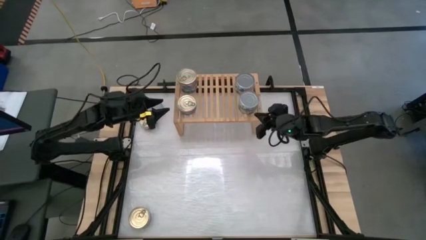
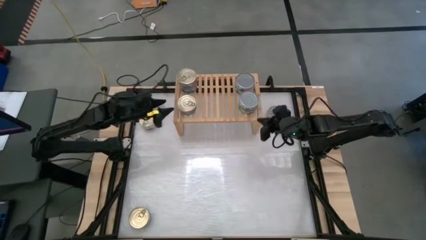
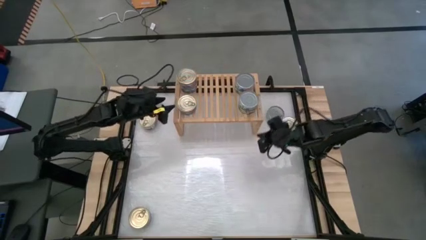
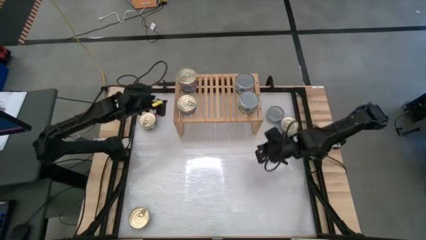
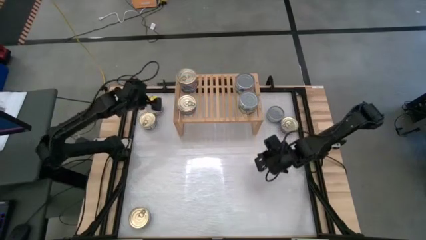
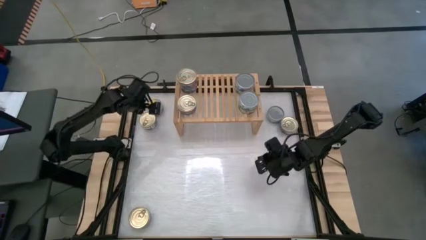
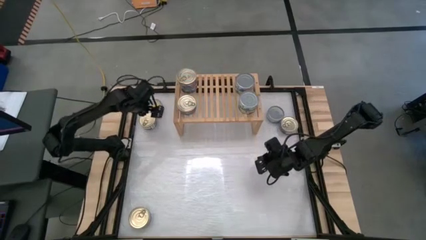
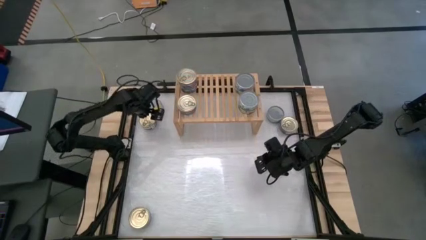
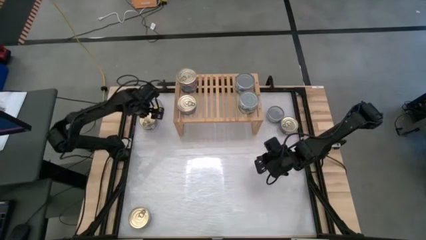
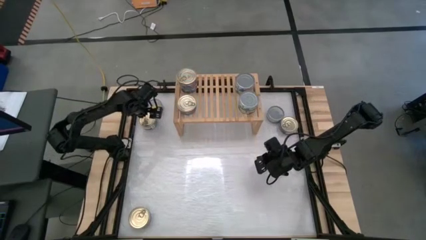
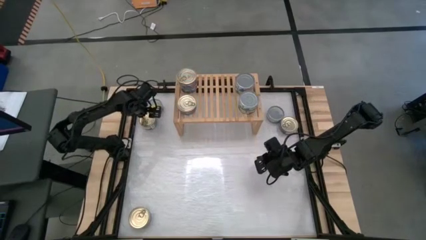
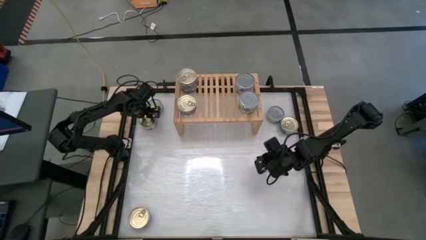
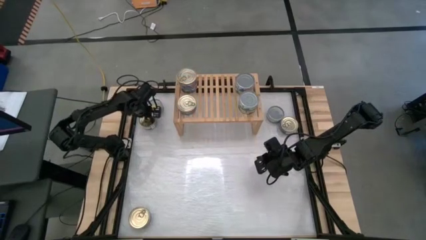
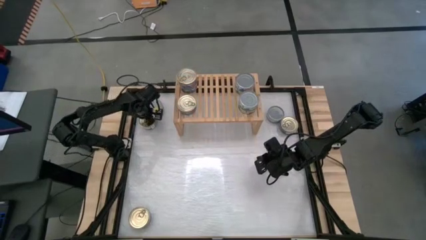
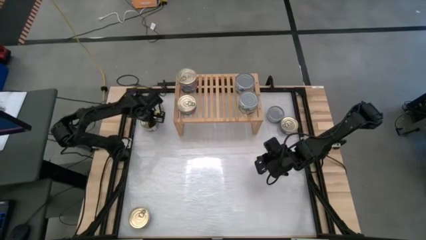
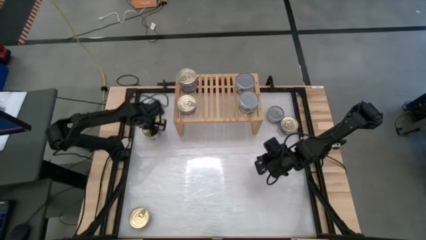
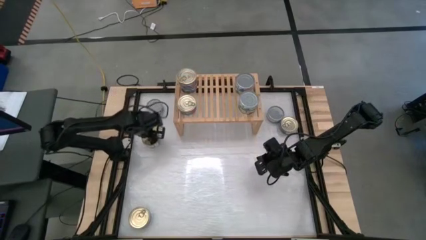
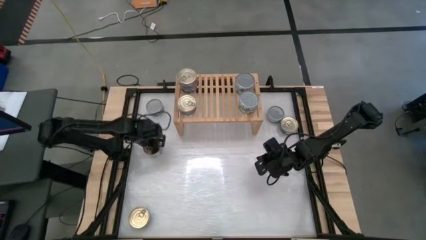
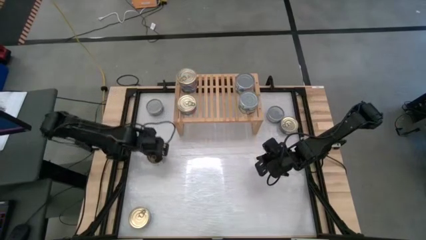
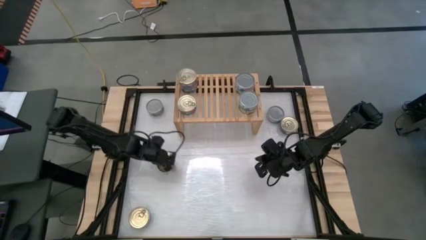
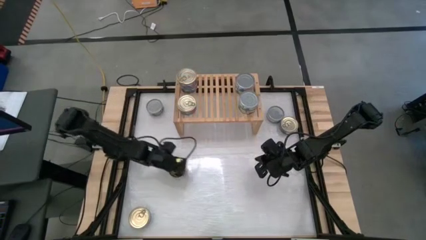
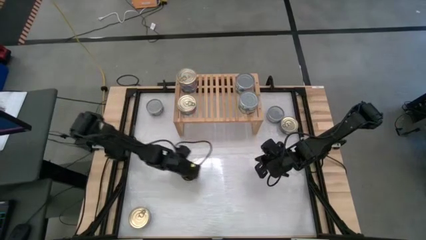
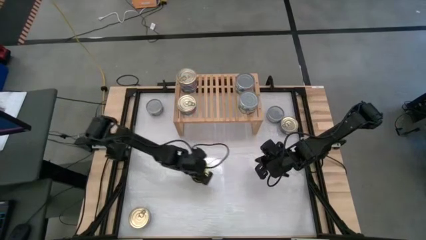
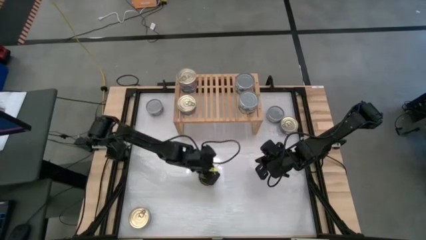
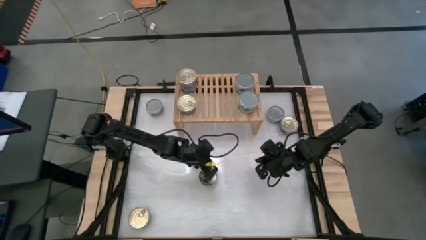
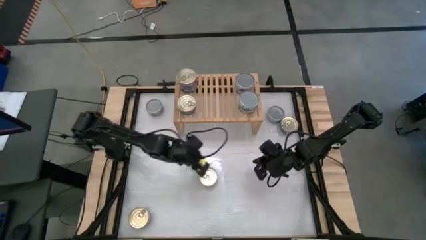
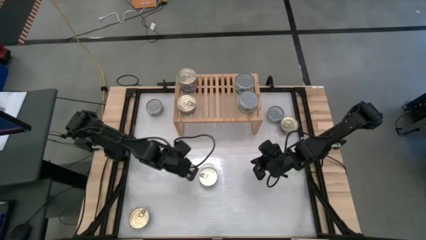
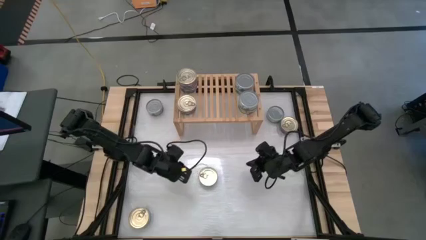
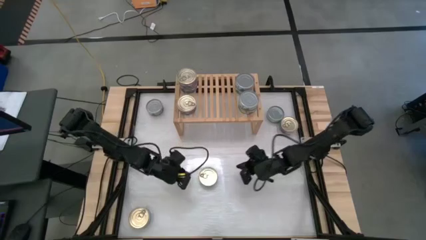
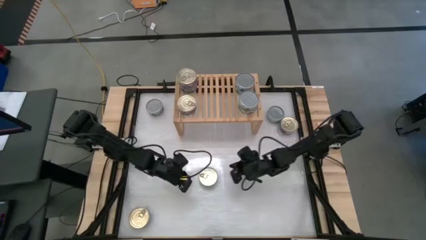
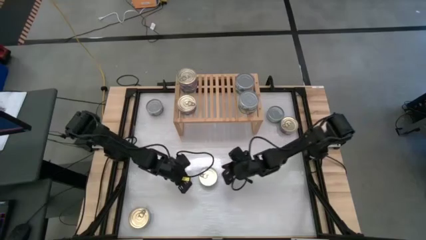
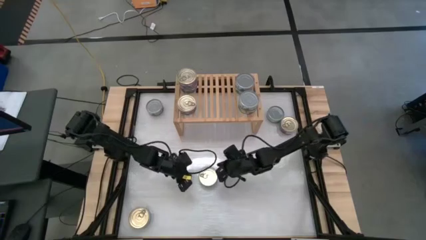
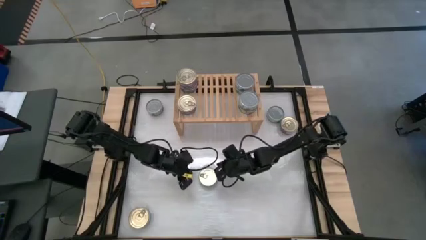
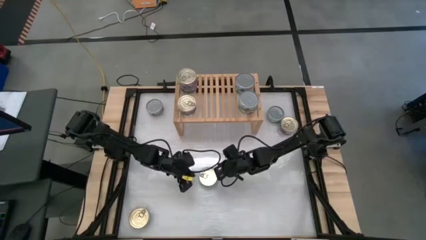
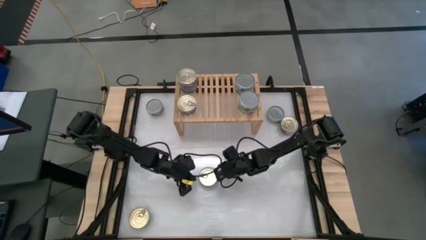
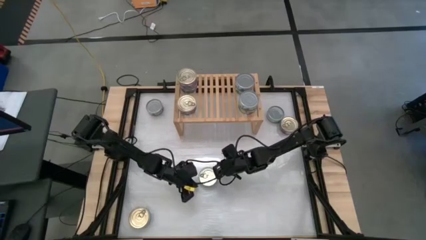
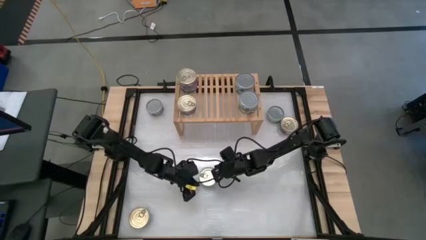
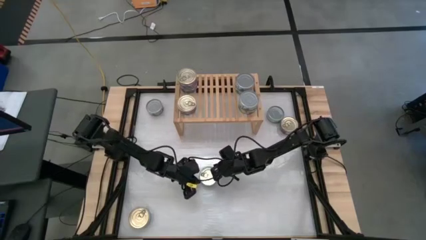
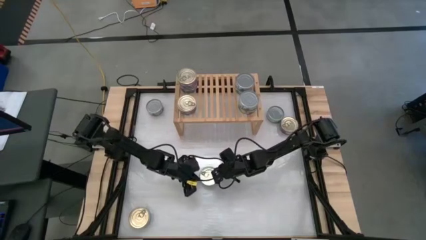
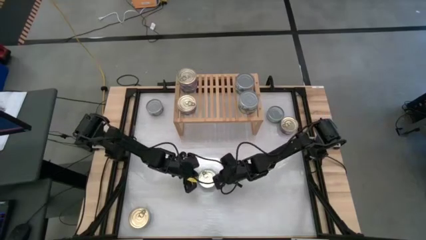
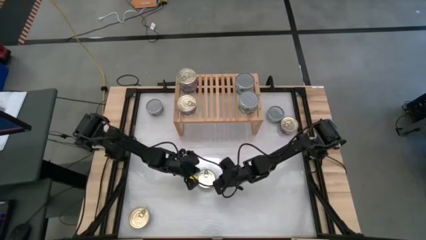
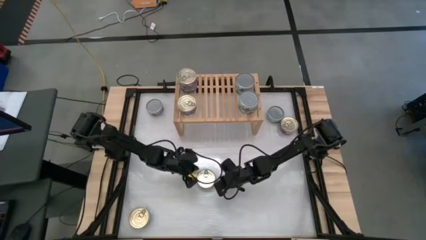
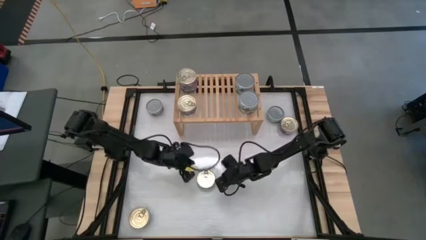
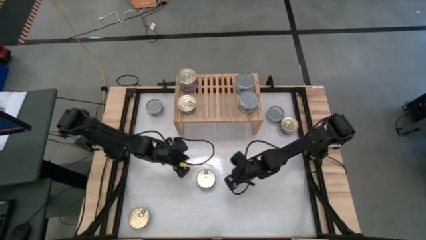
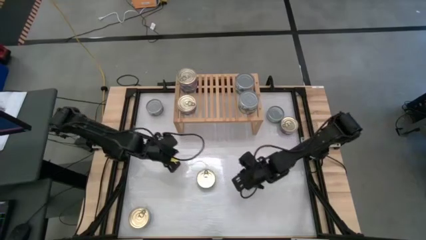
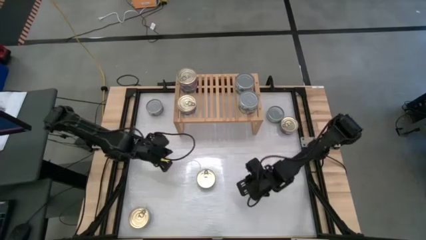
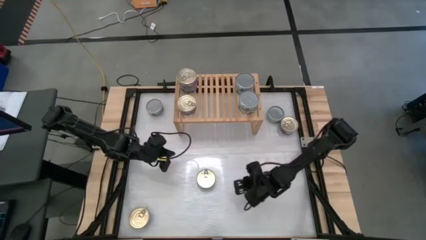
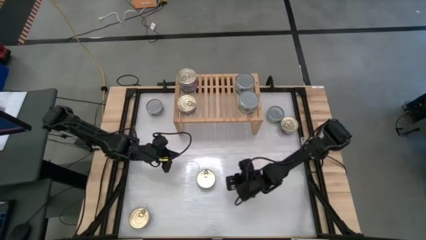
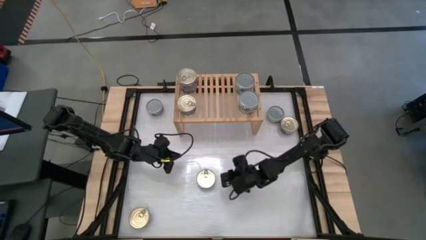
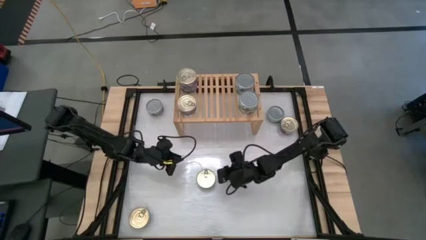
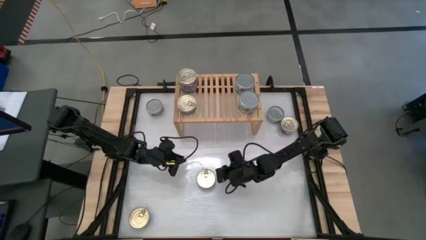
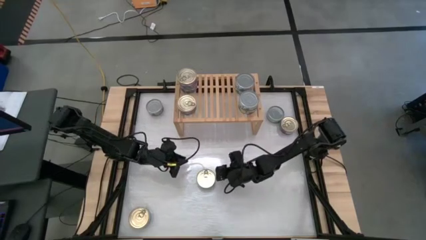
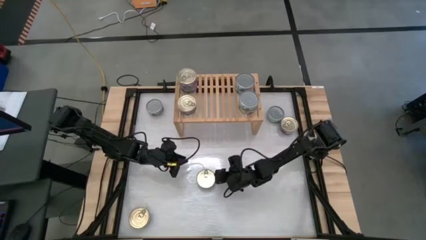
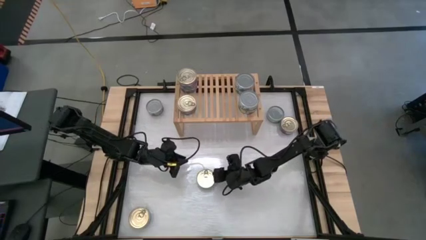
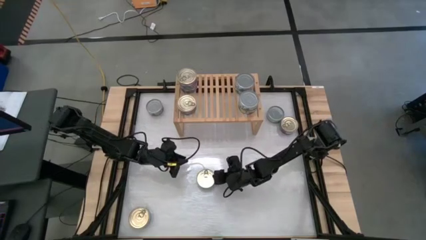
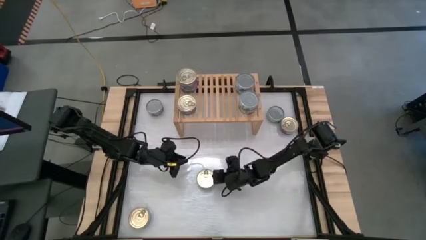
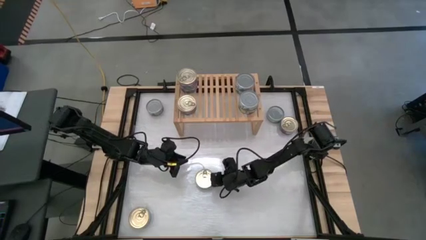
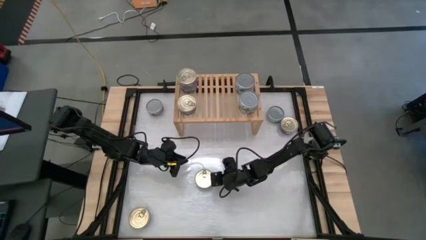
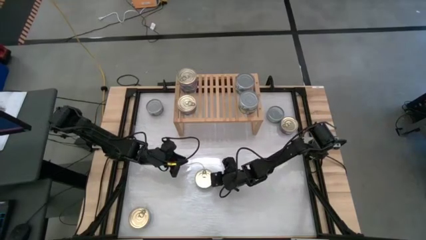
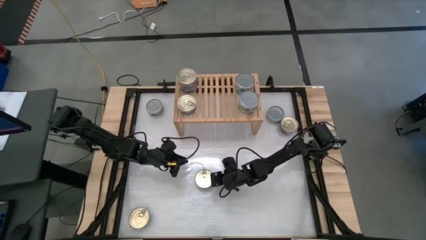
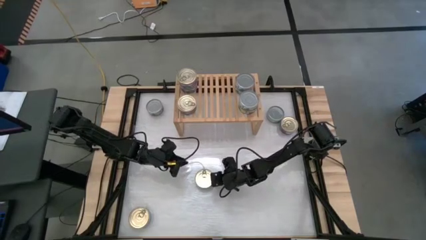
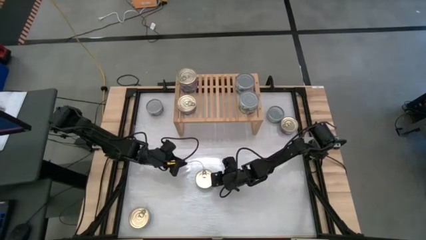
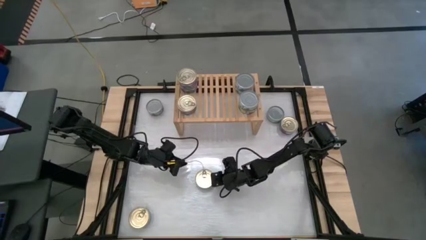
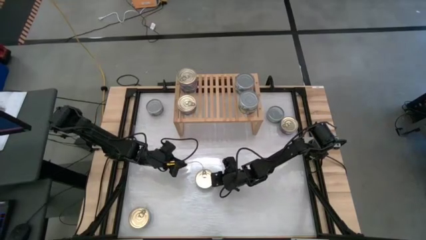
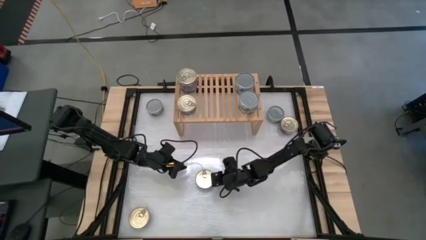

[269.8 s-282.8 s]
Task: Stack canned seafood by type on shelf
Stack the blue-pink tuna can on top of the other blue tuna-pink can on the shelf
